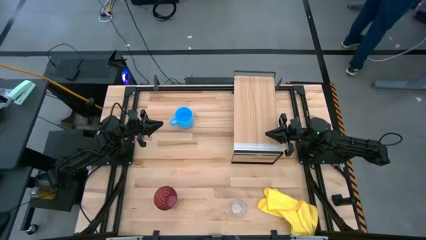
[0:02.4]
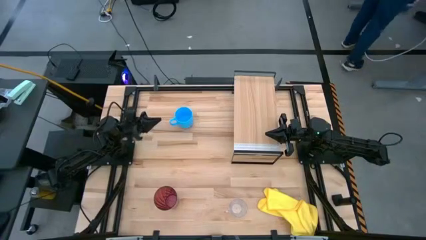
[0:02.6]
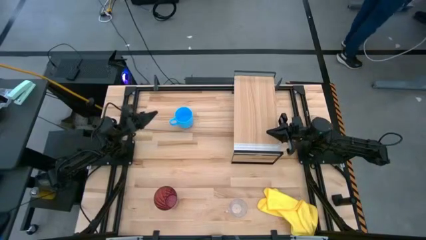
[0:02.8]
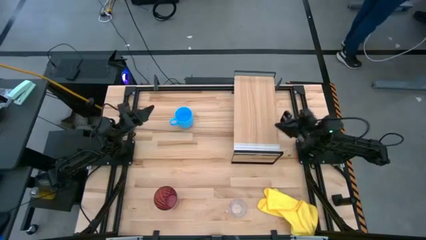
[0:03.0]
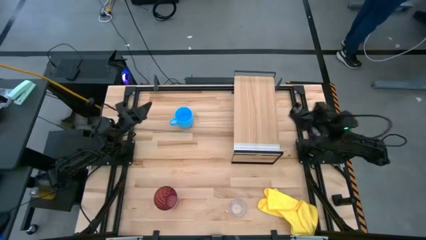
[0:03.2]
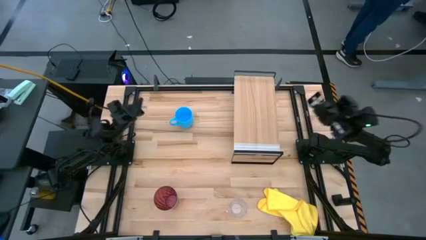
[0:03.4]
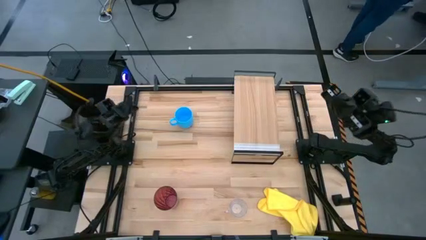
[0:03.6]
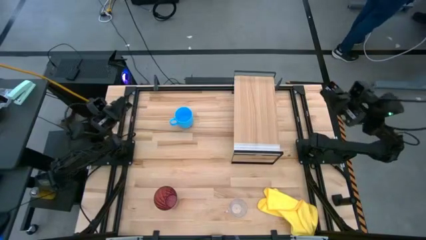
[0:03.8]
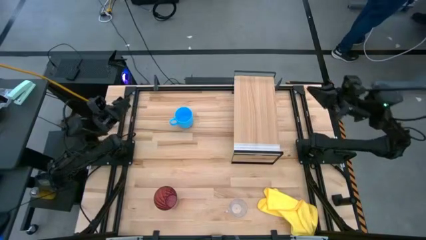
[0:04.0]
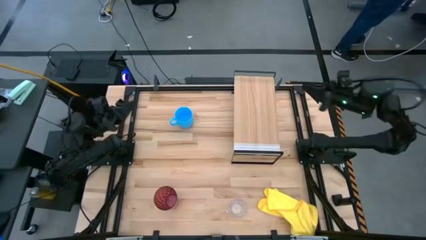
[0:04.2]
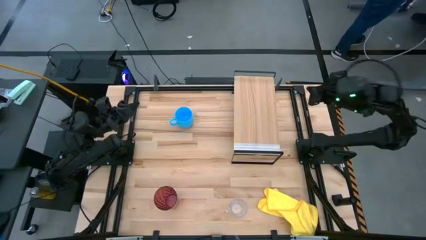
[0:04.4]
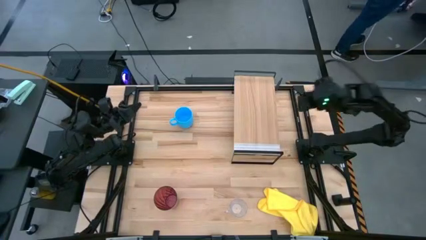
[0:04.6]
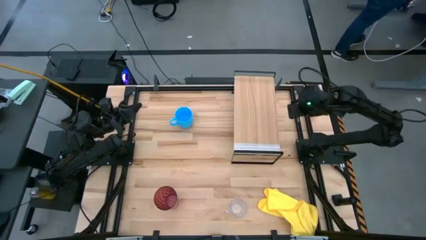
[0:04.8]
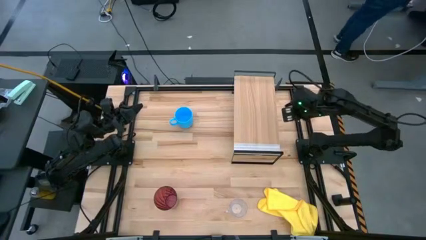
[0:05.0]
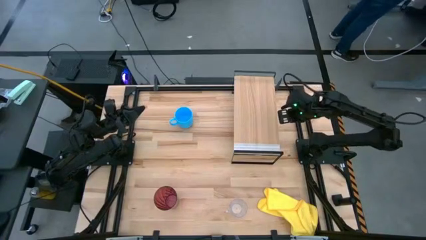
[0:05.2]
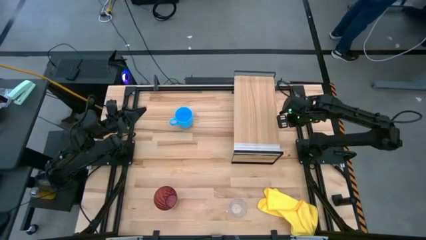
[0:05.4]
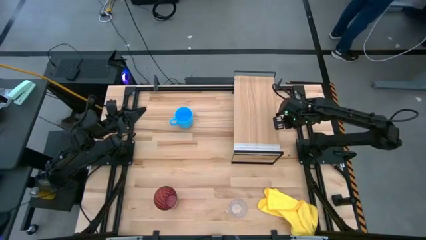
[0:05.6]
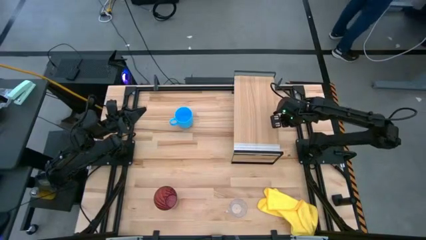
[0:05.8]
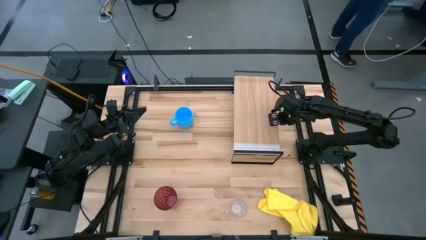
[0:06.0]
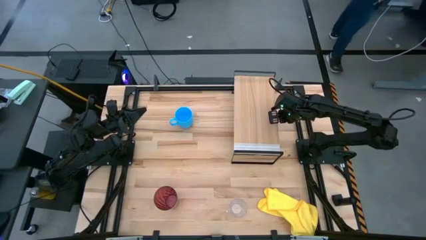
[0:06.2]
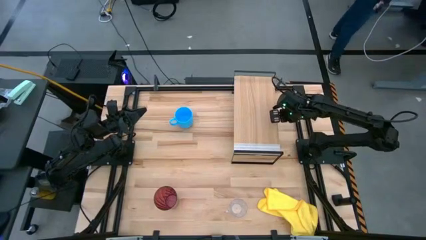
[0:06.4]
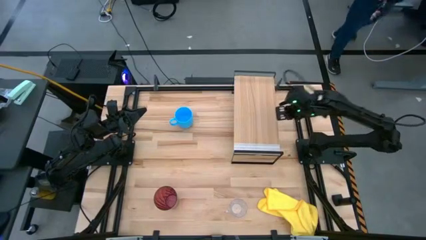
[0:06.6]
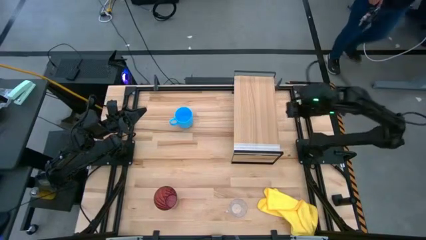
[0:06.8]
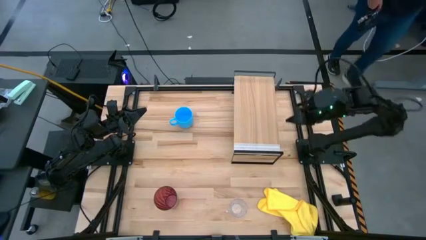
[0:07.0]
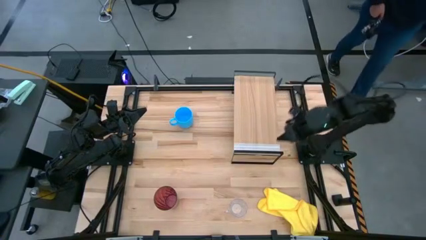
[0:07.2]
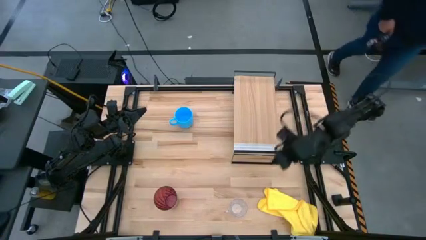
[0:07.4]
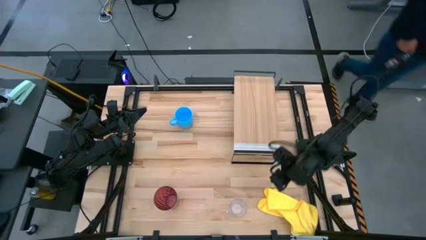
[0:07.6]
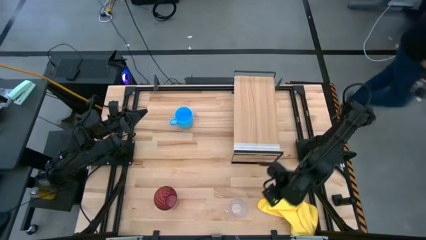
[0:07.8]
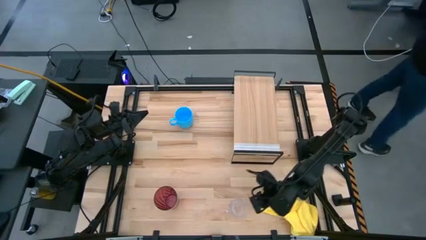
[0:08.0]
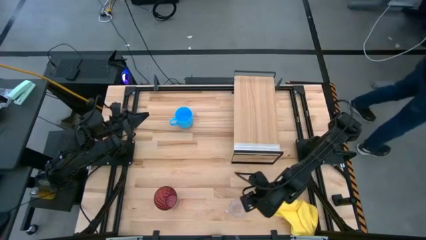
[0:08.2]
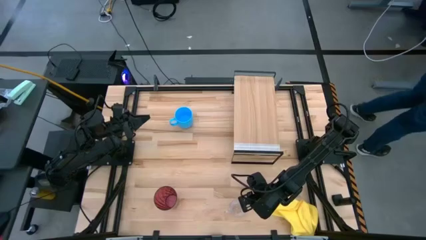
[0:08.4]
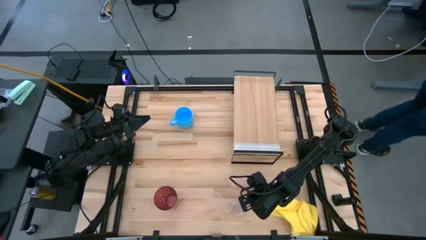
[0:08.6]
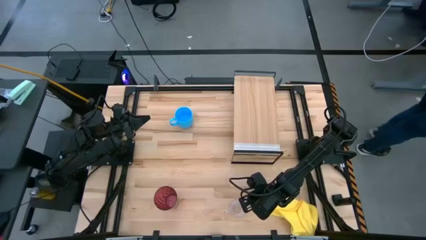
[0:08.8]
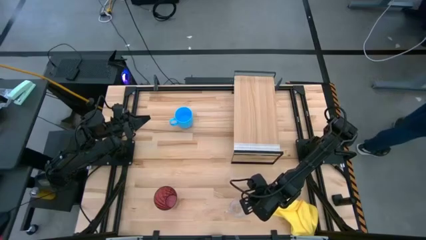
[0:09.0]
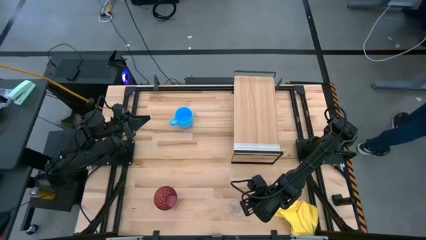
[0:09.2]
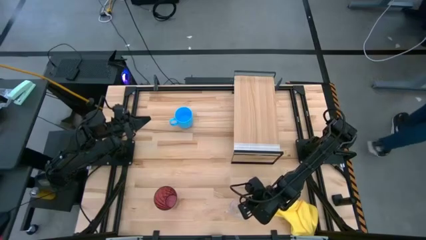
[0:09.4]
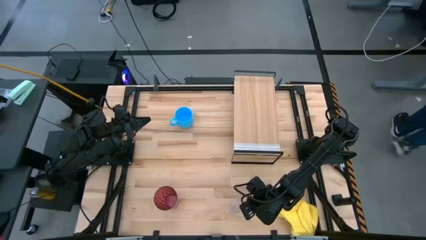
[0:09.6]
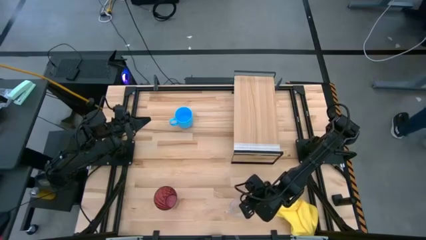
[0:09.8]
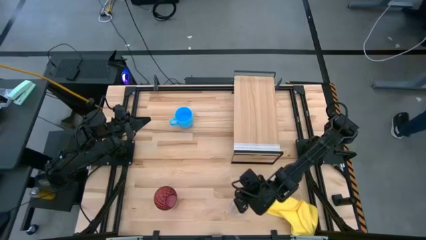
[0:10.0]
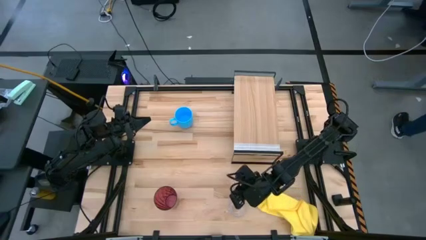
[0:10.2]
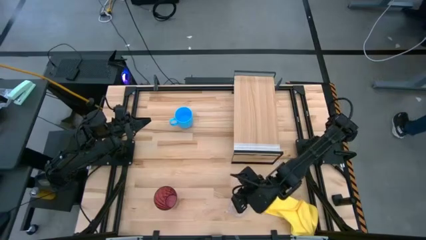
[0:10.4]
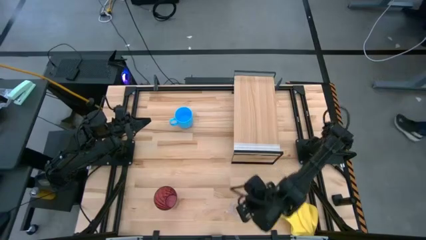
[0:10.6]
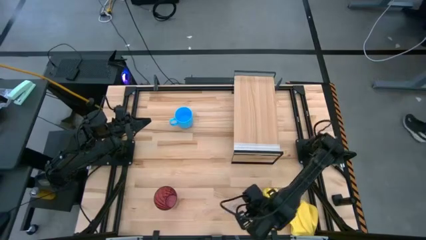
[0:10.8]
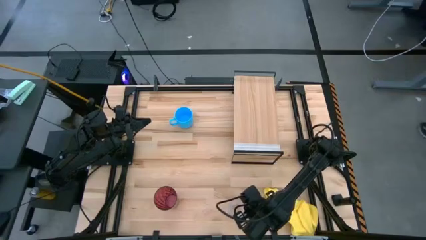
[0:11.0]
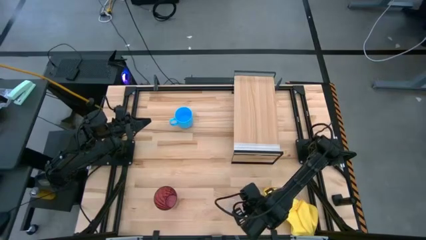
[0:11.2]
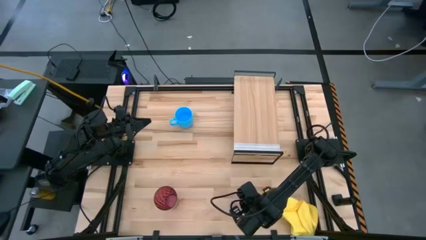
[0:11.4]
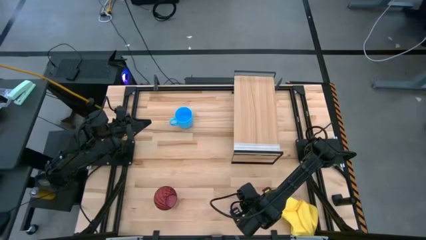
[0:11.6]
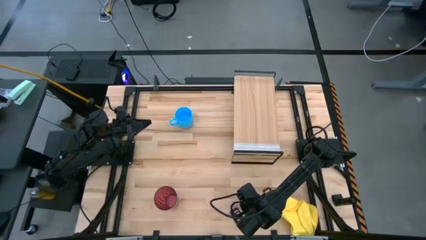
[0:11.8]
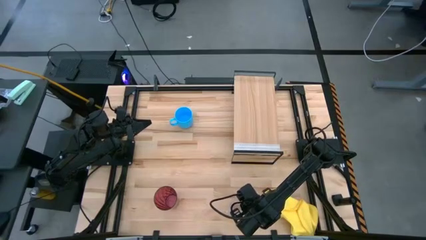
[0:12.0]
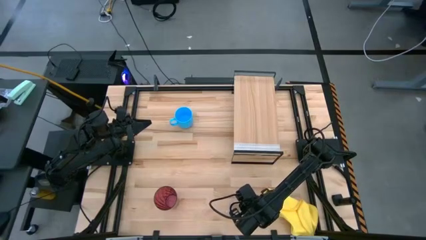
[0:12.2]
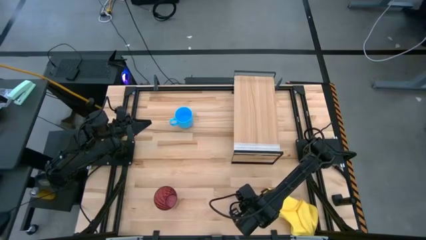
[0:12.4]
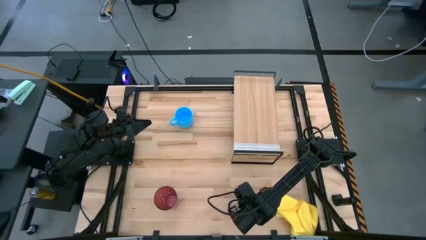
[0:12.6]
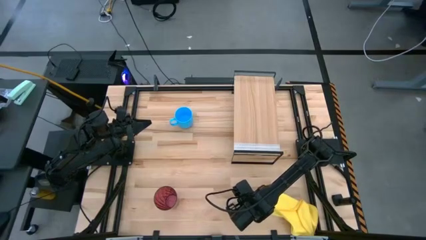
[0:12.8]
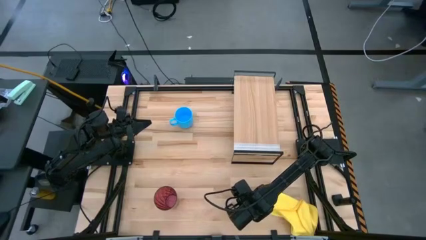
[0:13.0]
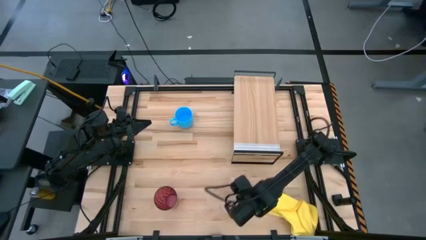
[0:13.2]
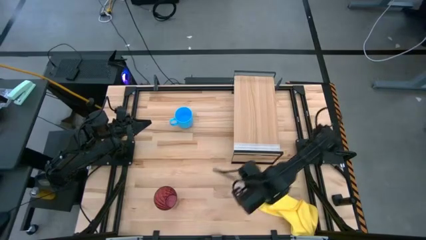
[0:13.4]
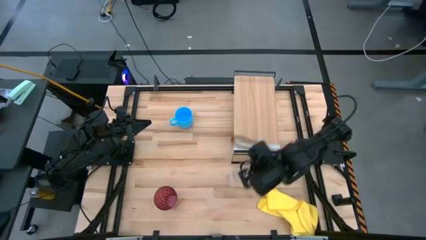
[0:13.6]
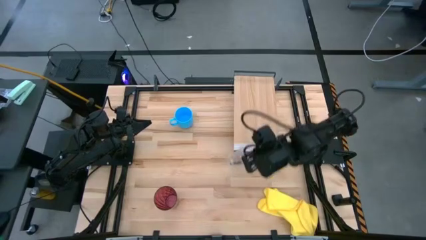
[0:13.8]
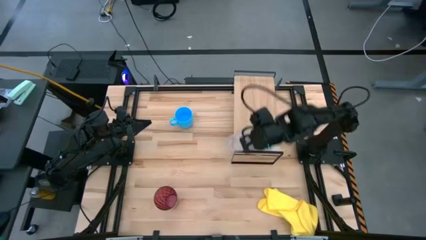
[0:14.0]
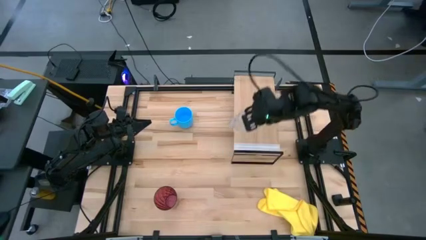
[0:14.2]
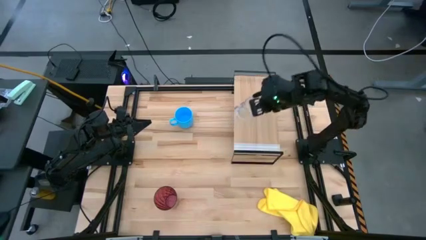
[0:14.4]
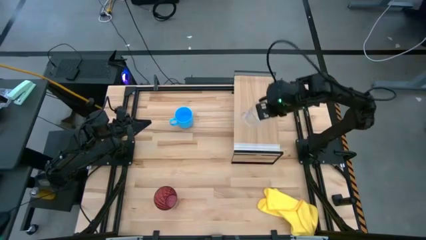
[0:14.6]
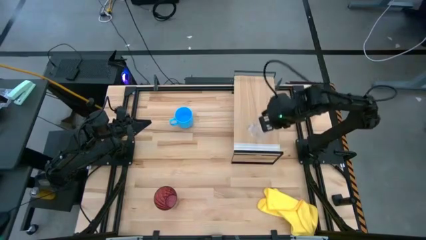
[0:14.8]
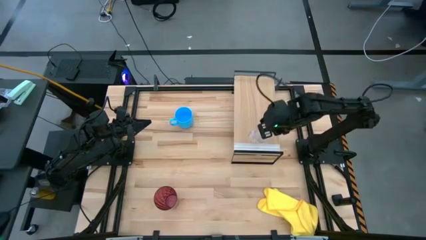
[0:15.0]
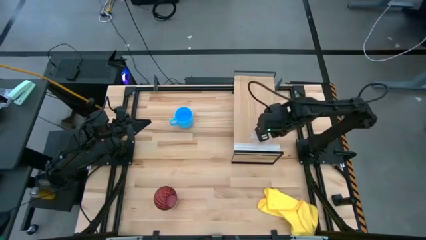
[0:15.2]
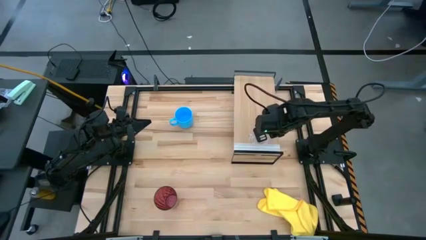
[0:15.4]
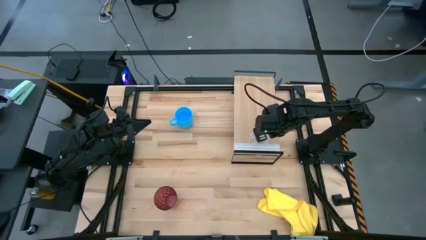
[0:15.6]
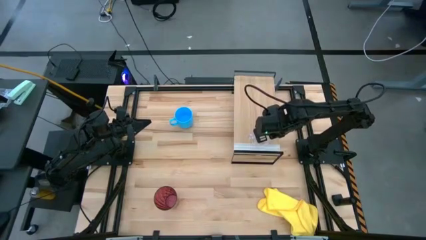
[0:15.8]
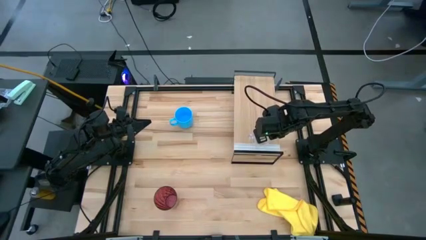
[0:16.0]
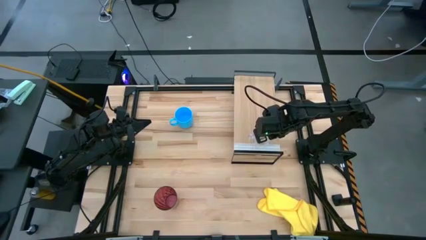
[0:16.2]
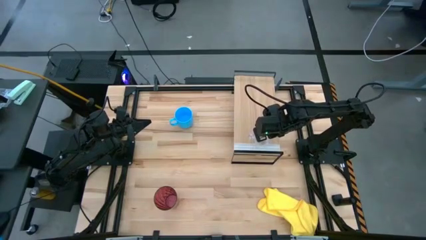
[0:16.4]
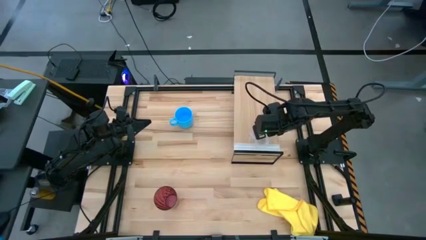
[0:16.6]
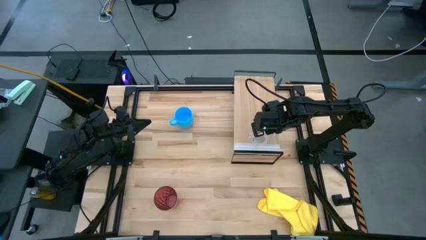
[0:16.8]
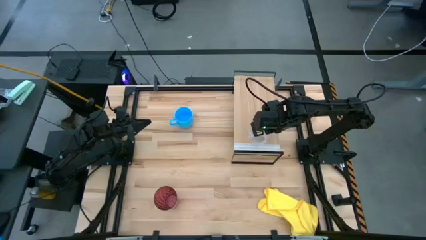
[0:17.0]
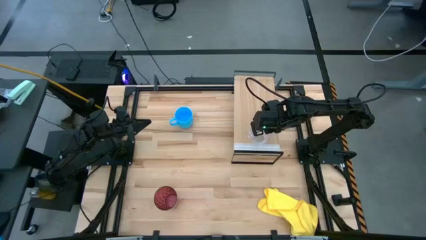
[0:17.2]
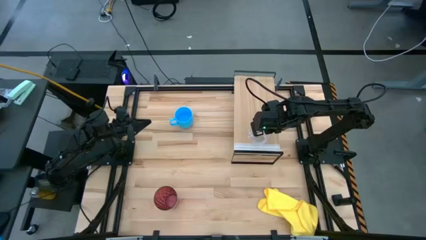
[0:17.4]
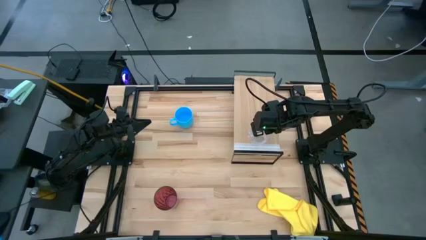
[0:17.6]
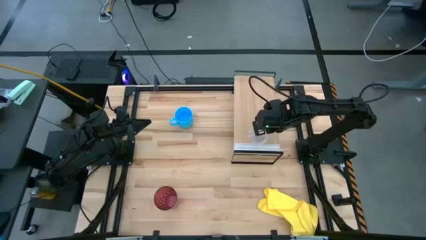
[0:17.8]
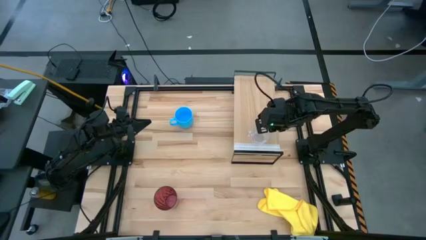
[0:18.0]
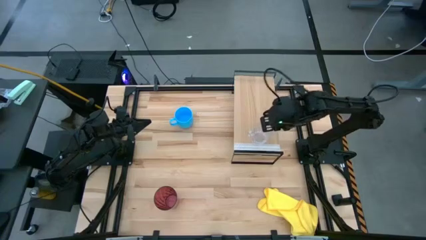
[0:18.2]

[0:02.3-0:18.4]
Task: Stack small to large cups/mugs on shelf
Put the transparent cup on the shelf
